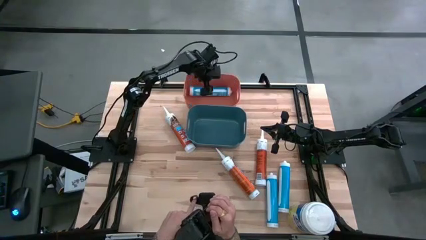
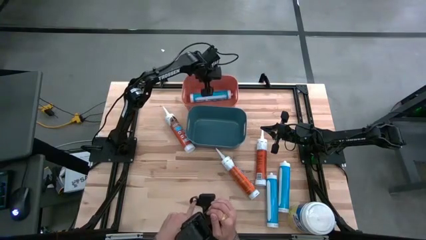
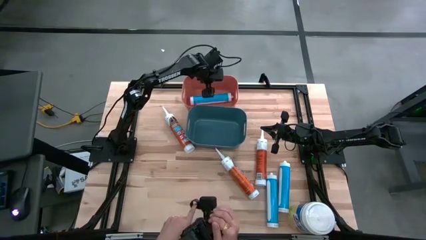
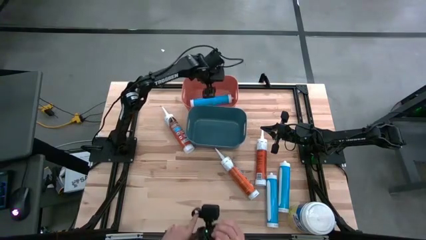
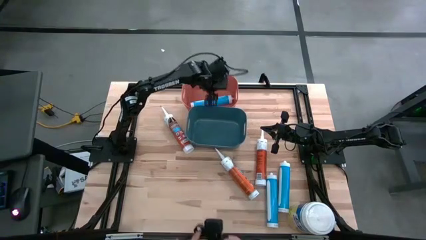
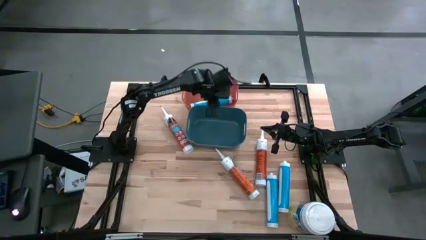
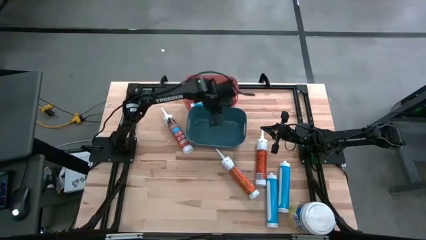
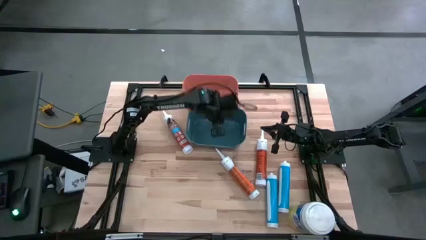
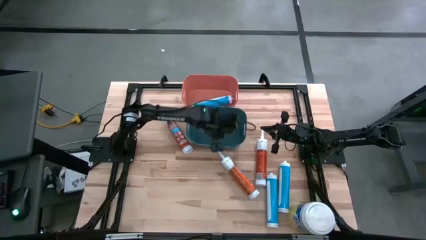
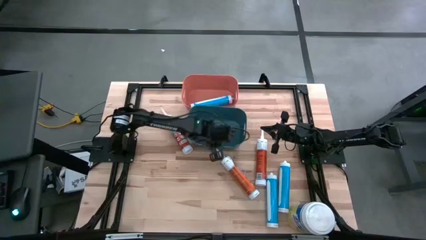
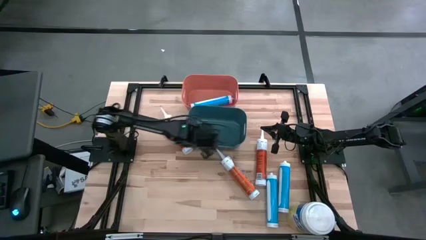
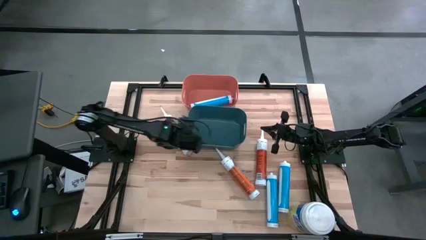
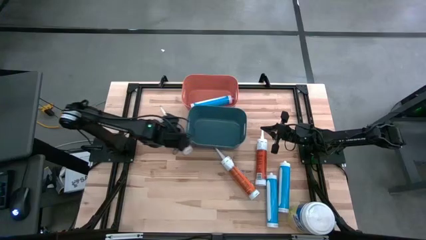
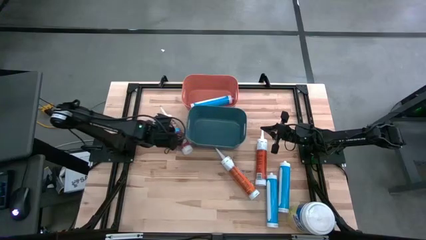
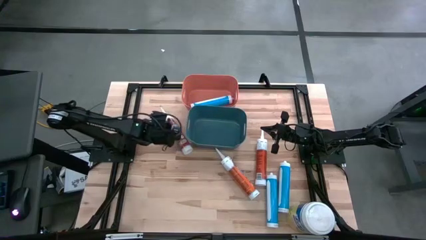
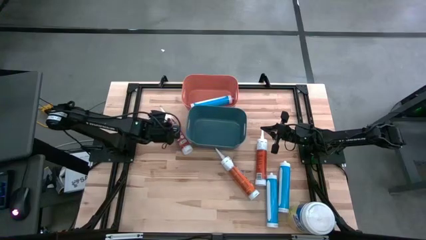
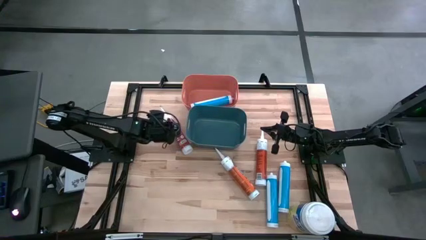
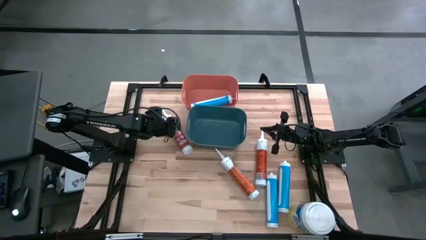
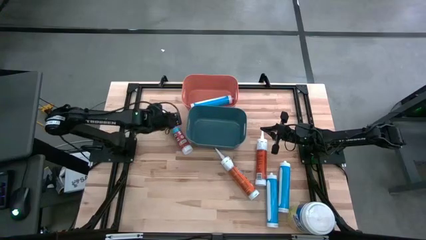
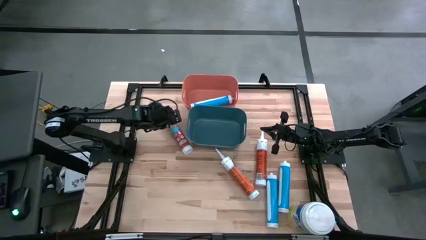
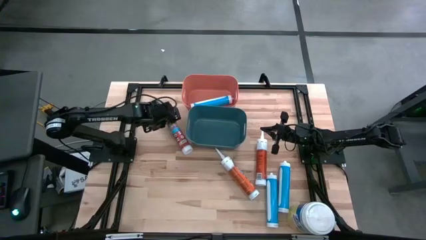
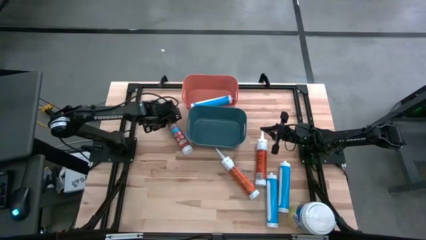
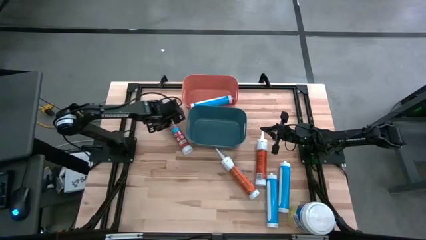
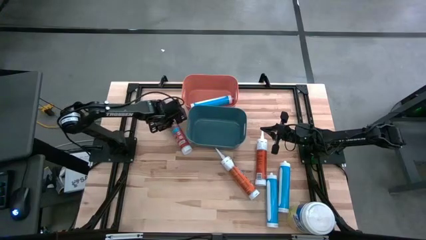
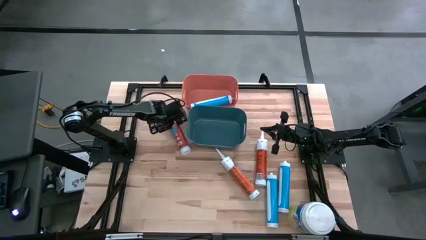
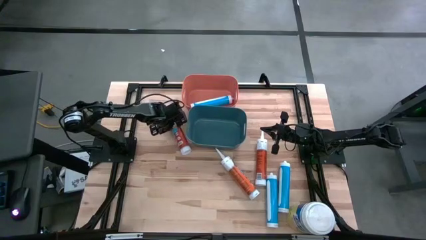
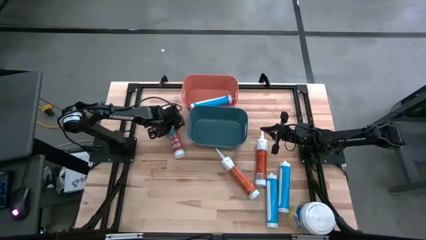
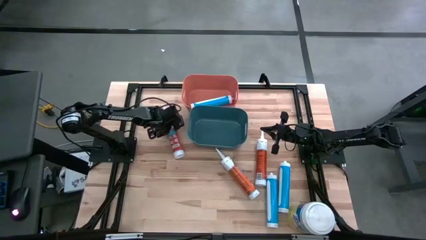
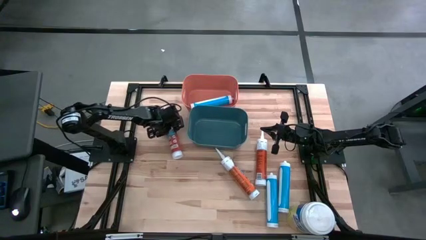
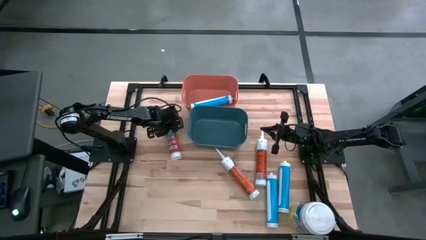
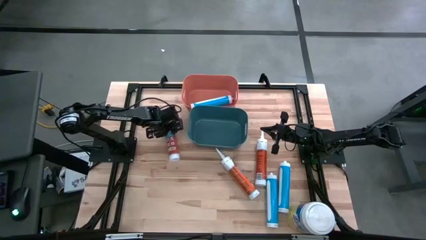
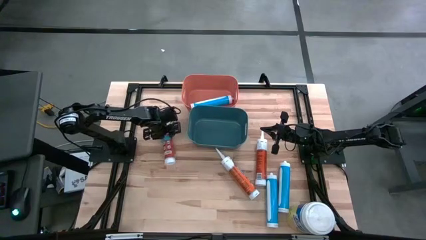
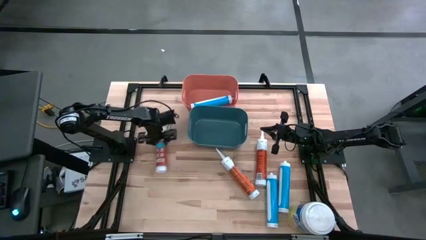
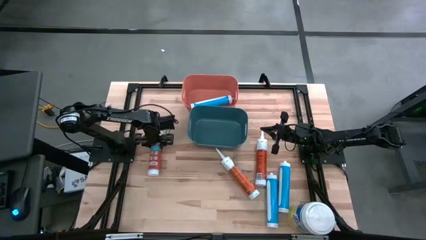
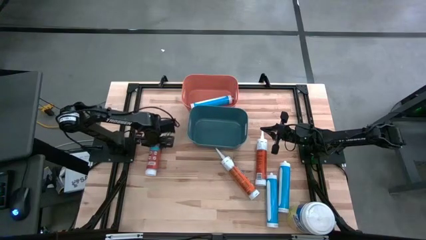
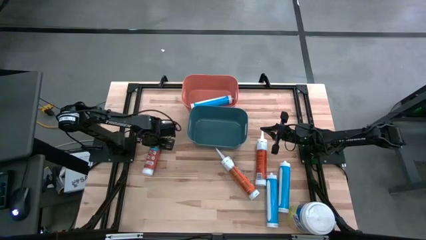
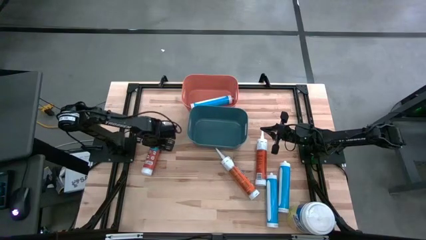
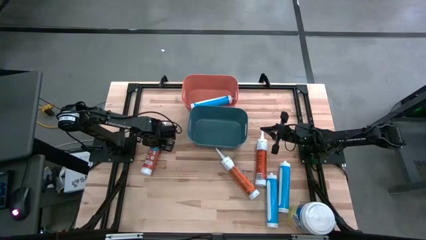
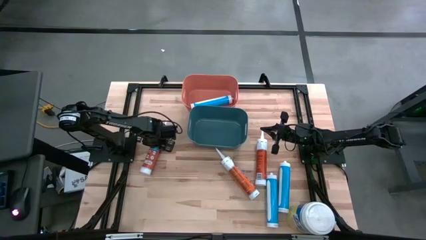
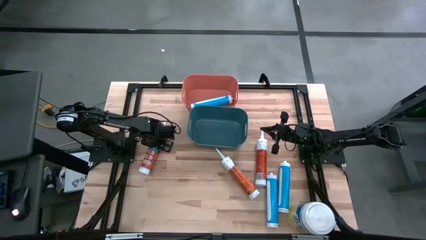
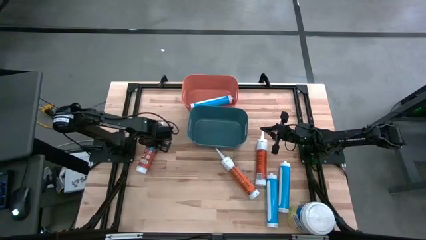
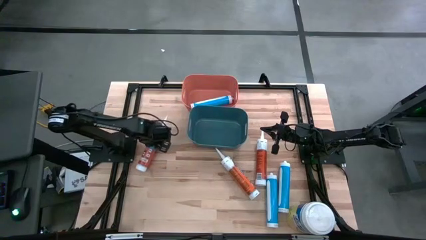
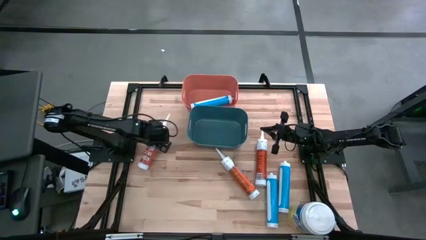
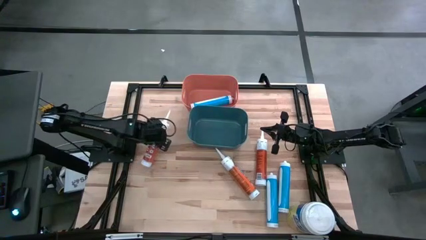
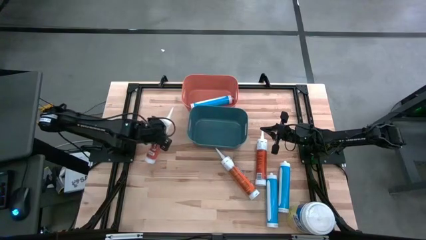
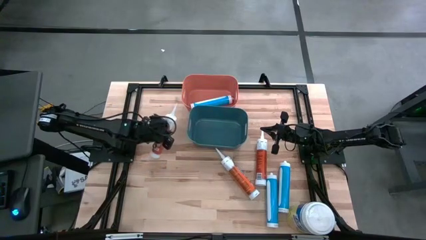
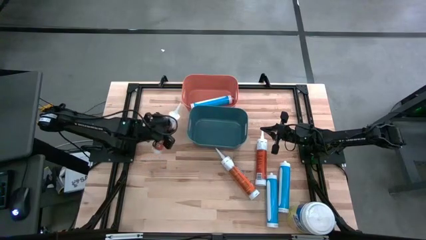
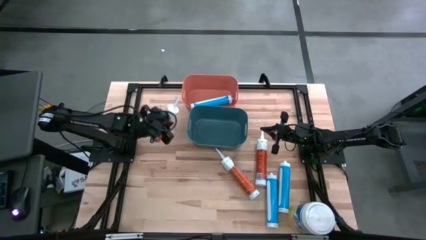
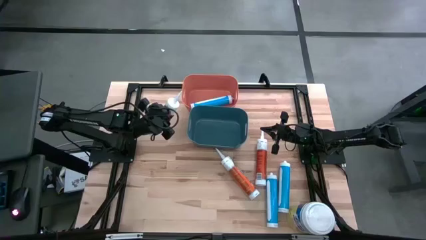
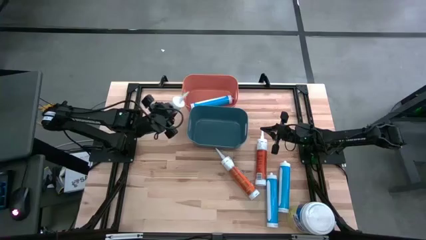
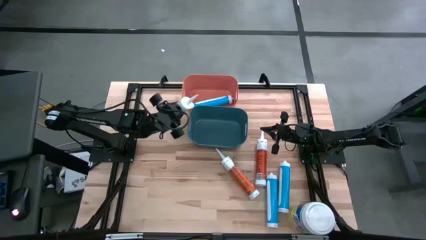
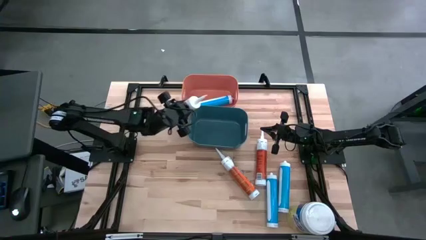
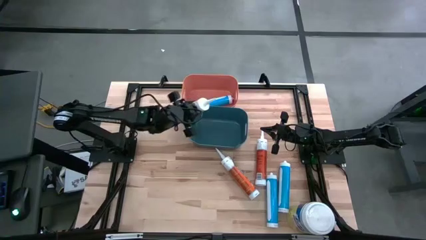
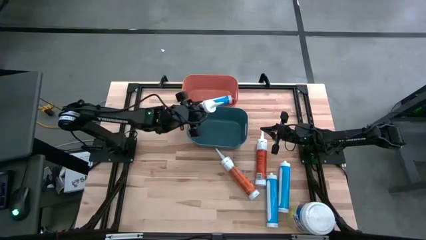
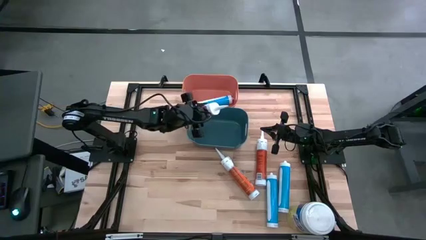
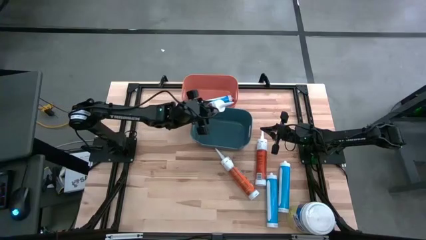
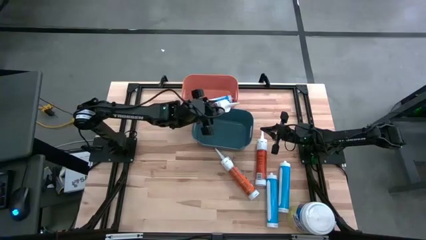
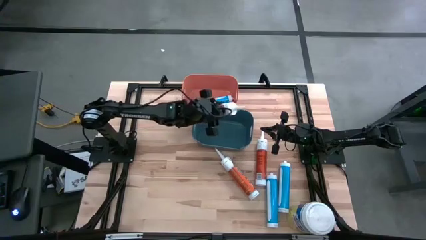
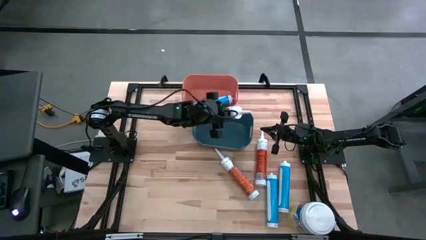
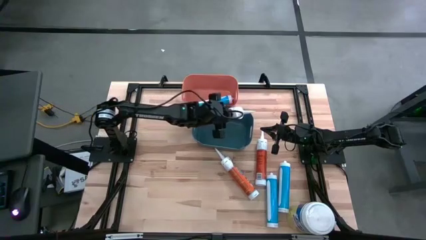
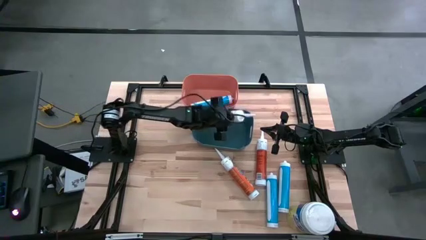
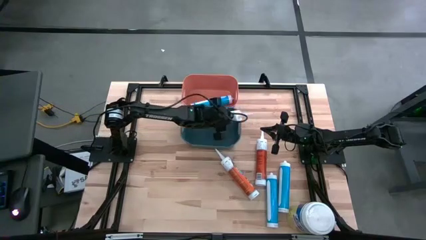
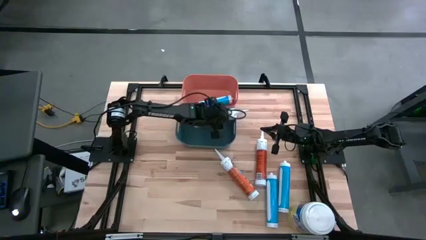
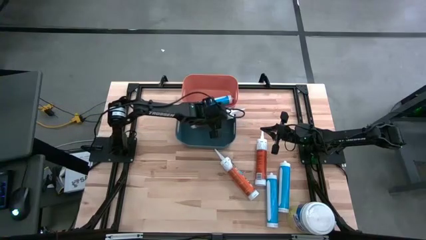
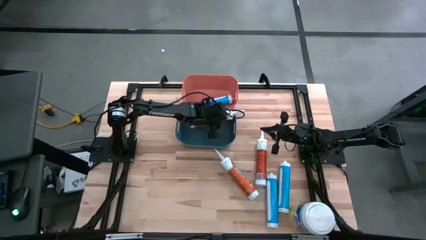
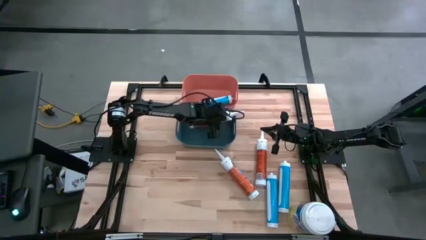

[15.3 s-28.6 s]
Task: Pick & place silicon tubes, Sealant and Lysol wipes
Put the top left orange sealant into the blue bin
